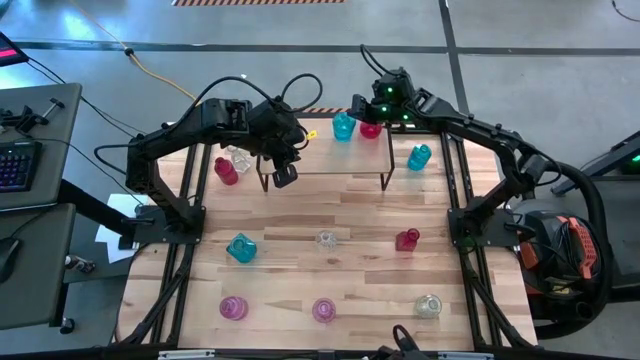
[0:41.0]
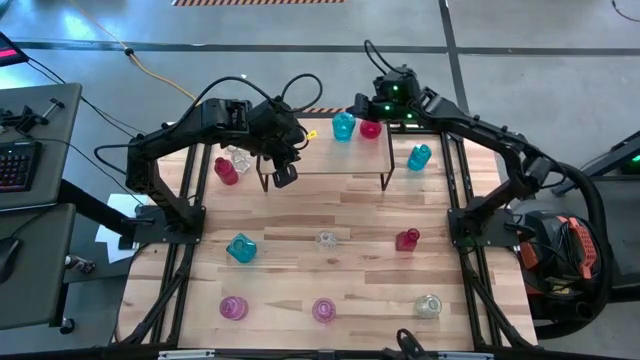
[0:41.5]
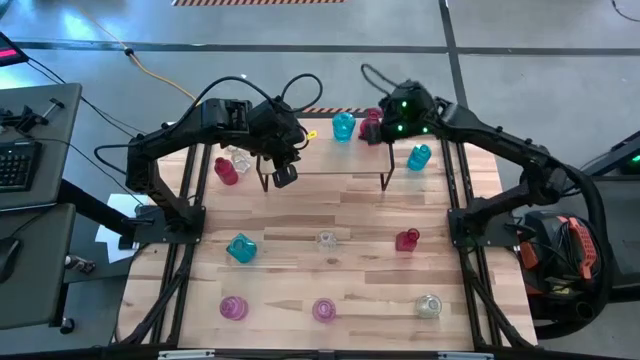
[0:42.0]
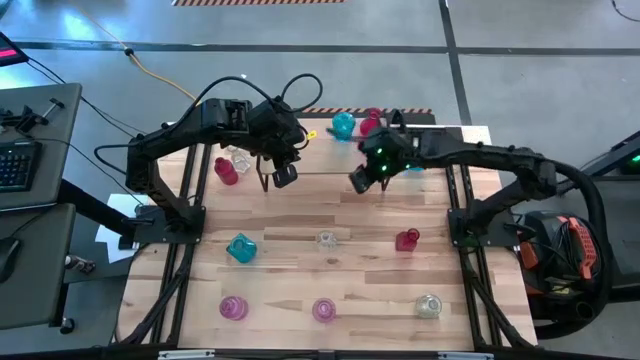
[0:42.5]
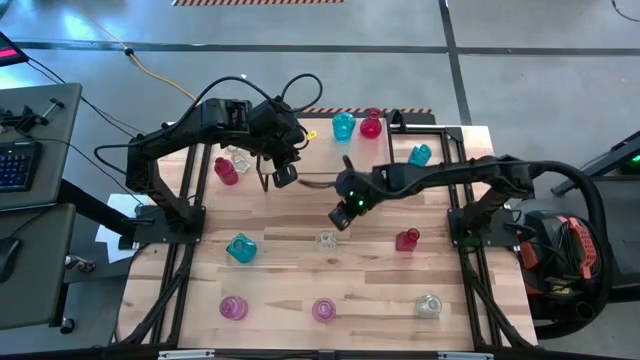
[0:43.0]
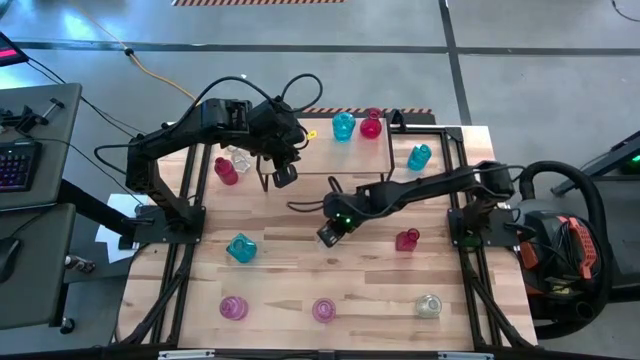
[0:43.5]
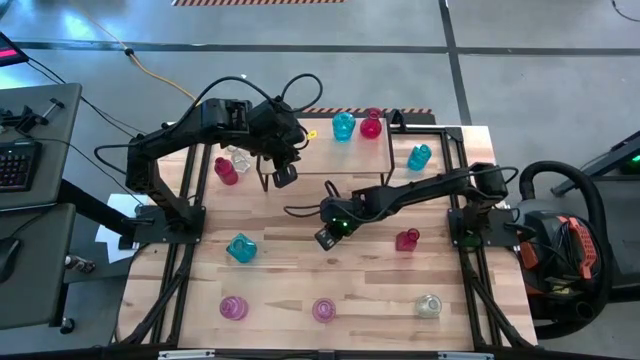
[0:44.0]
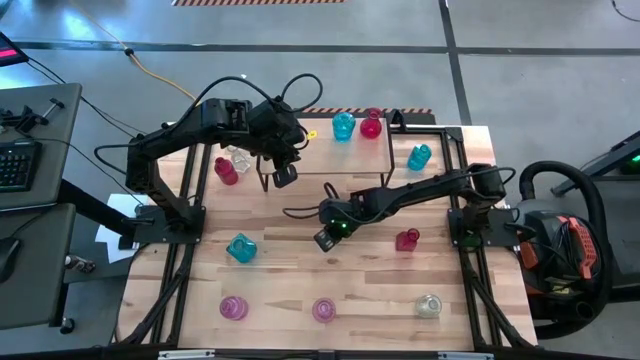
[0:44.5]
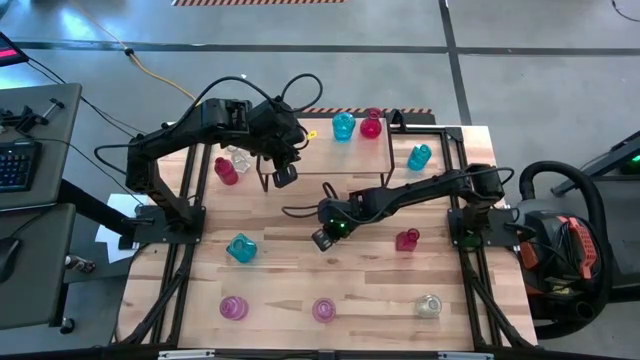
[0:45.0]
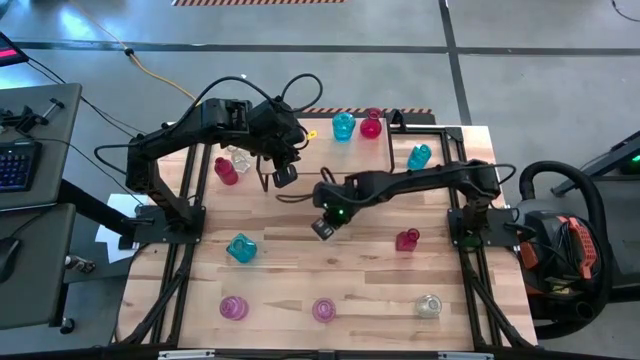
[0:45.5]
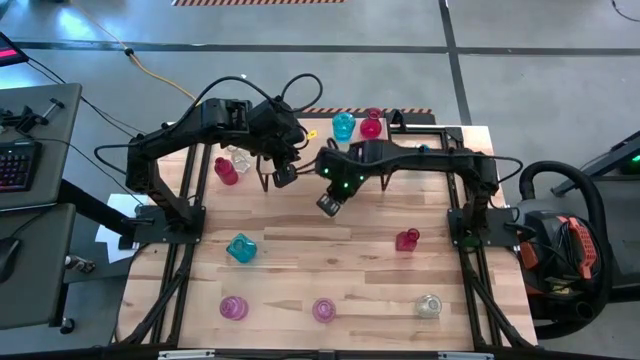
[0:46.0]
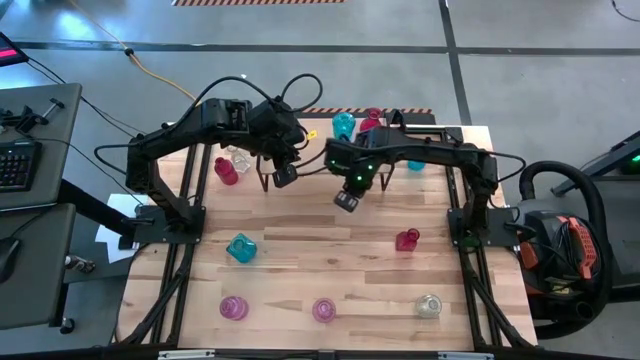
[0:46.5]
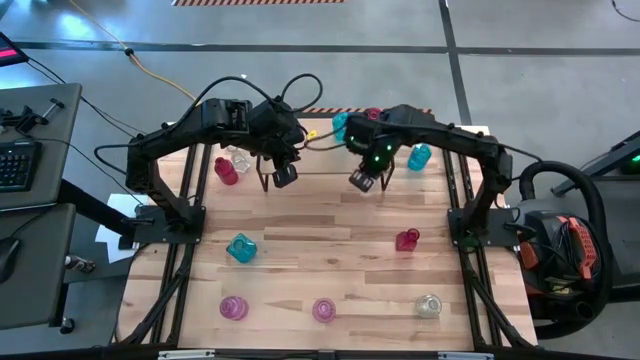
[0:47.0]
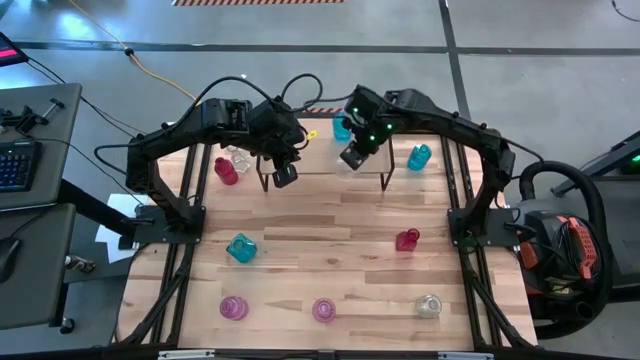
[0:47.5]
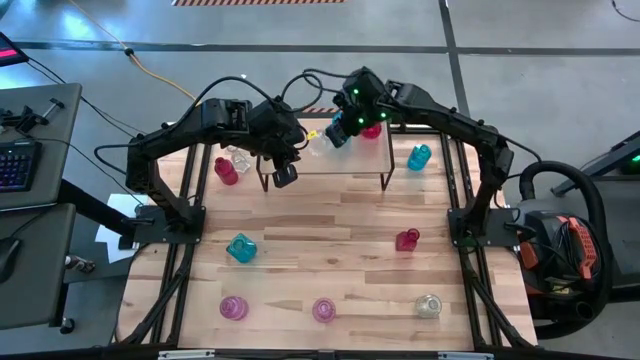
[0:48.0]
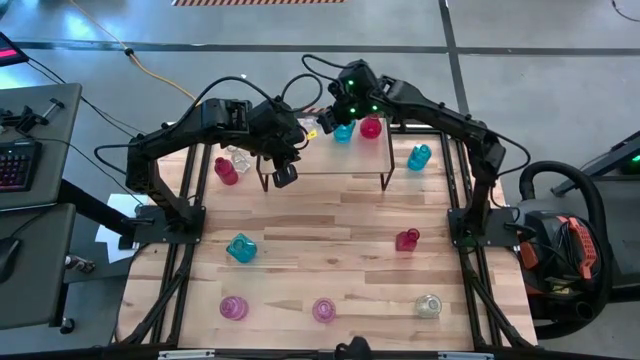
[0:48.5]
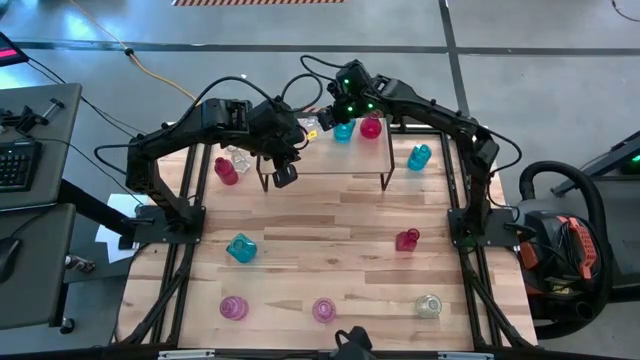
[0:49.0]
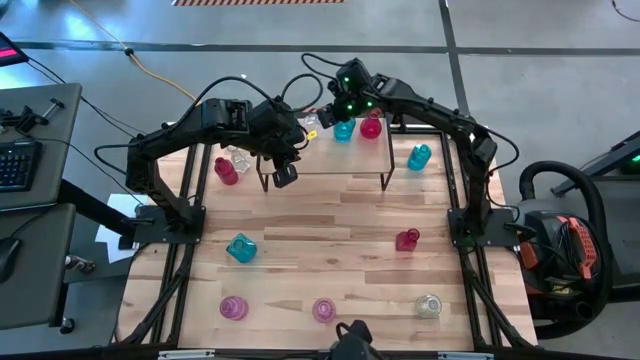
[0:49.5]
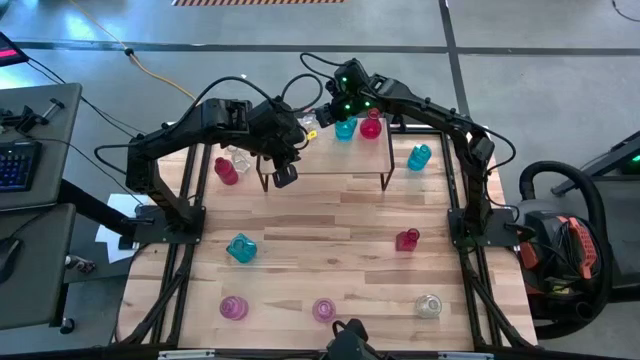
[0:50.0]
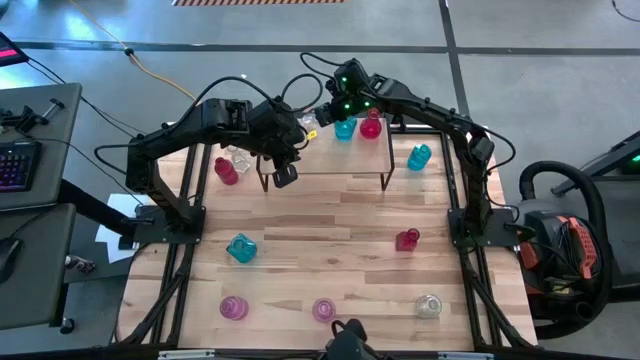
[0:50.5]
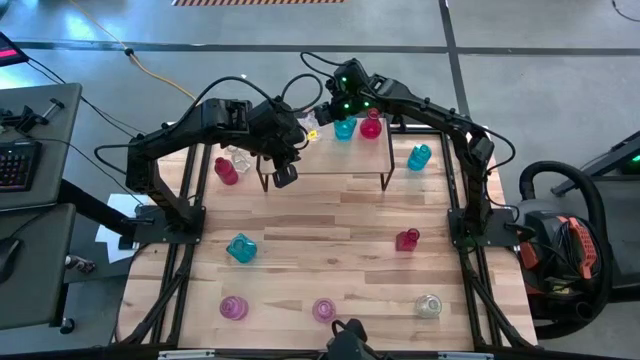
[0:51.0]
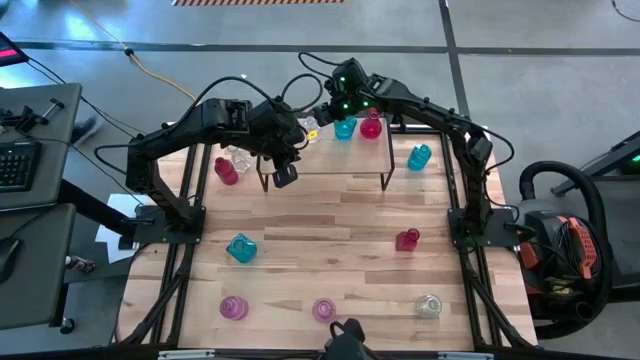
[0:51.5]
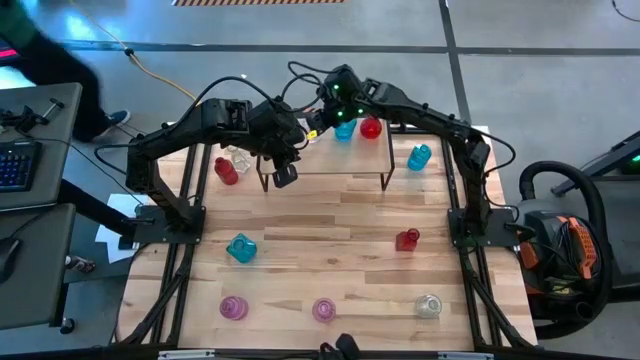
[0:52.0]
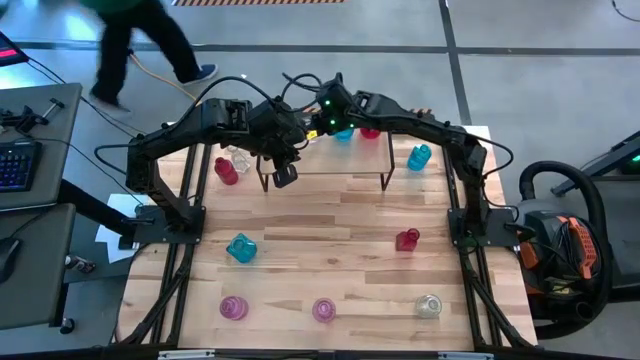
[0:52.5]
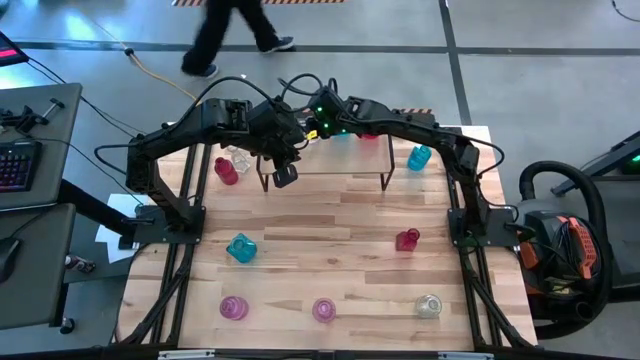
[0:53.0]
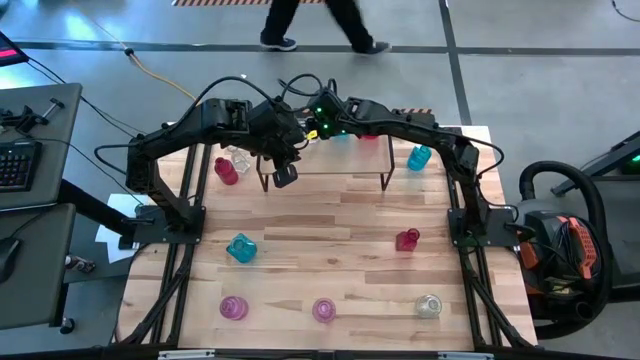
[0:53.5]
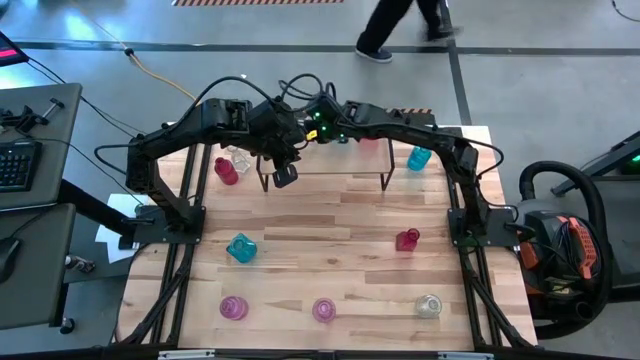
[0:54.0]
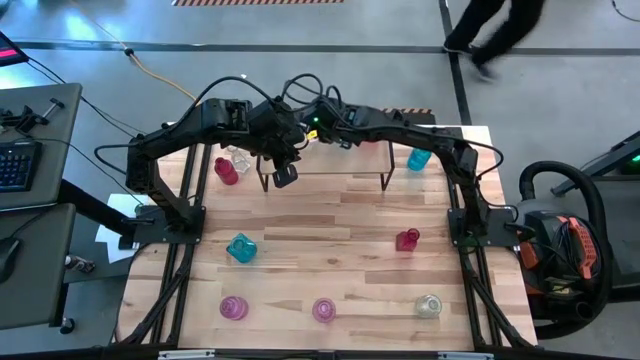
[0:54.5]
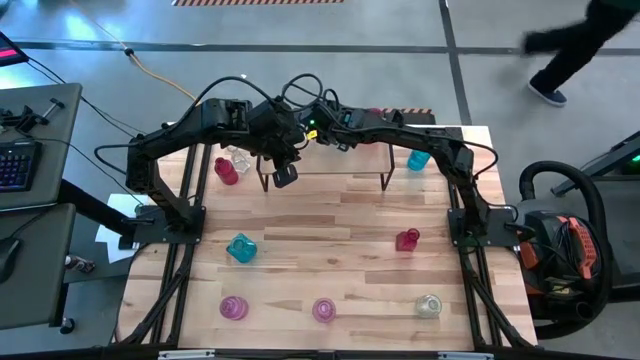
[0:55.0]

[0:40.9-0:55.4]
Task: sort vases onto shelf
Put the middle transparent vase on the shelf

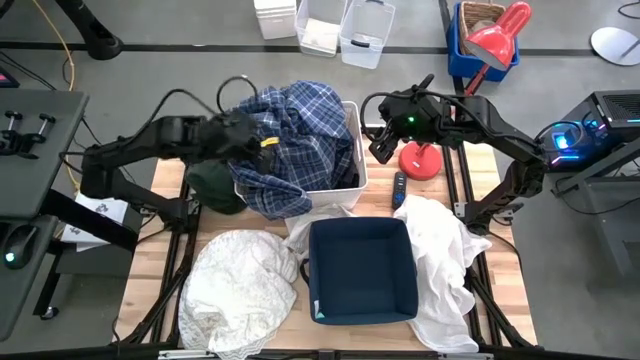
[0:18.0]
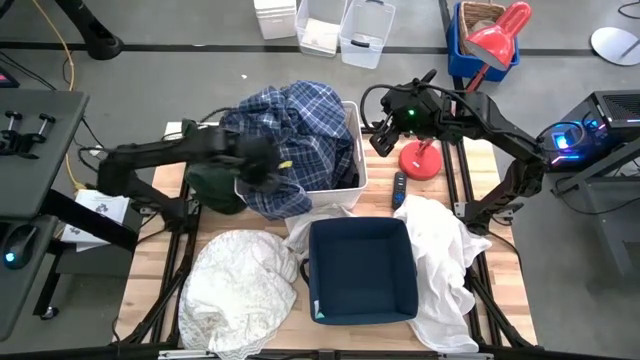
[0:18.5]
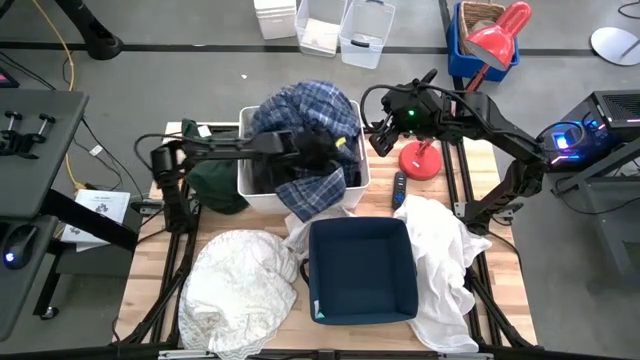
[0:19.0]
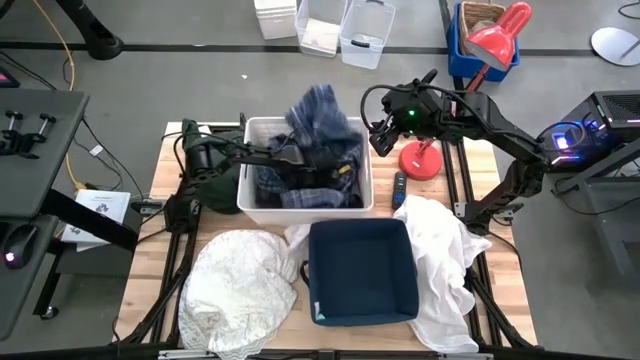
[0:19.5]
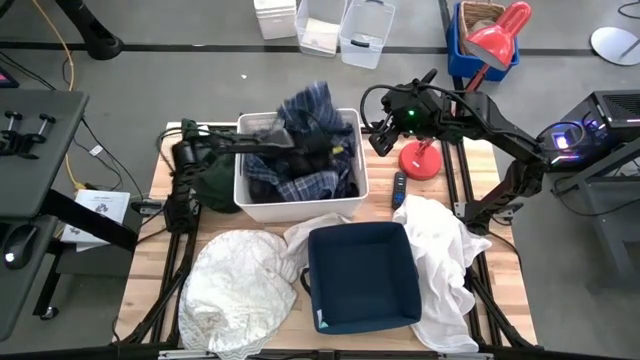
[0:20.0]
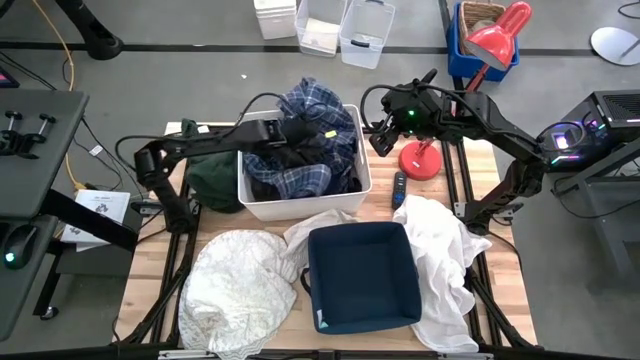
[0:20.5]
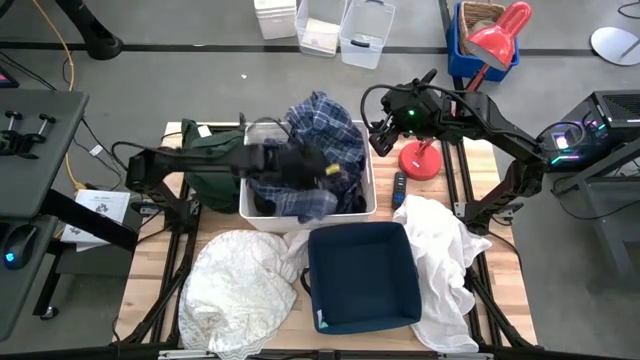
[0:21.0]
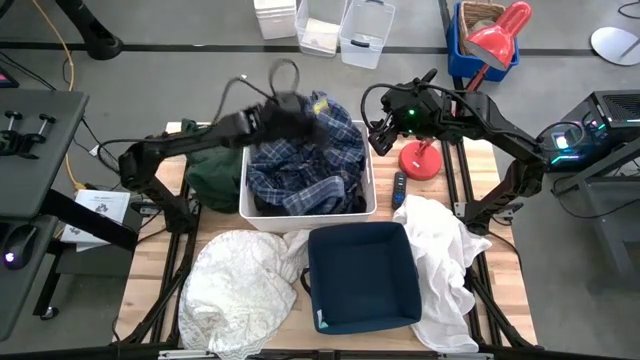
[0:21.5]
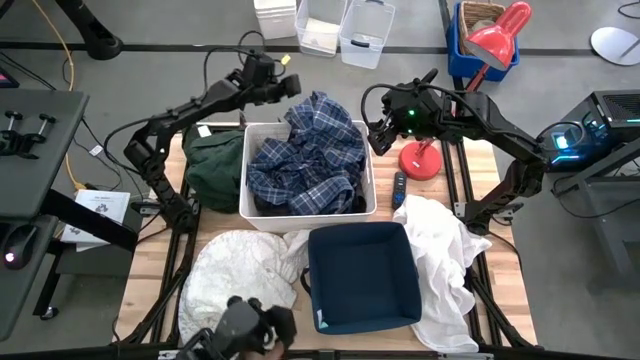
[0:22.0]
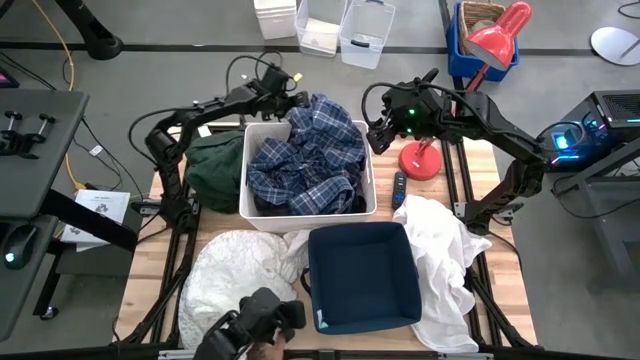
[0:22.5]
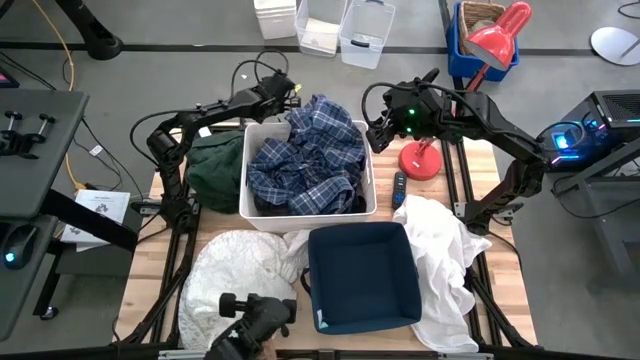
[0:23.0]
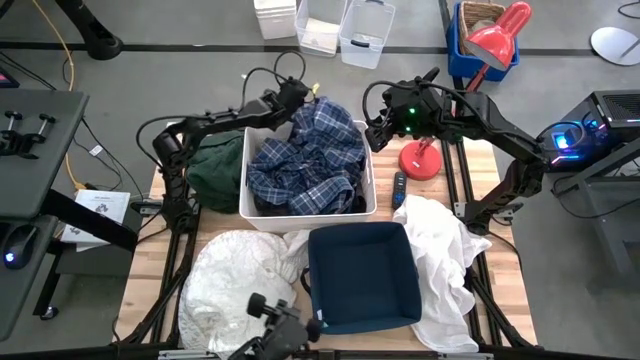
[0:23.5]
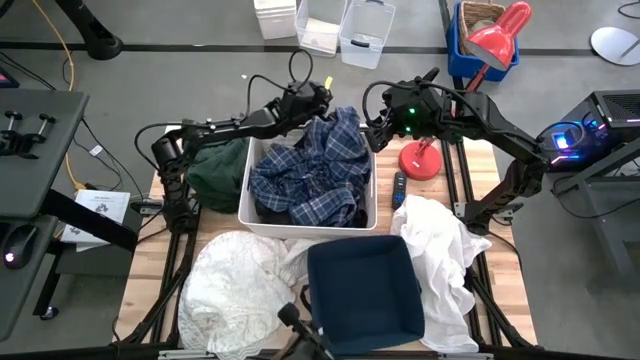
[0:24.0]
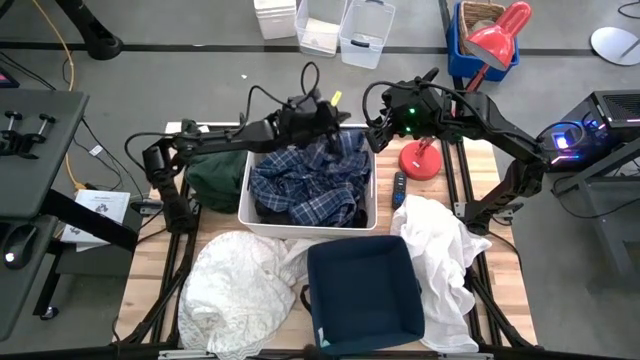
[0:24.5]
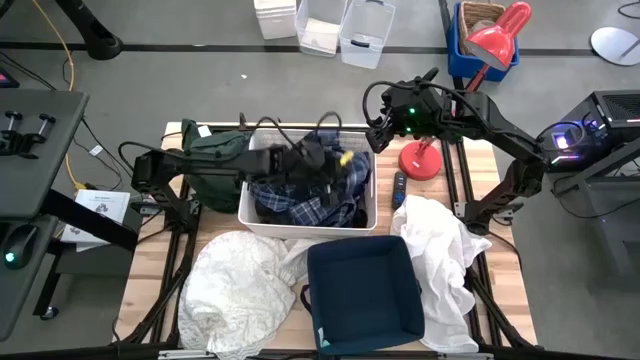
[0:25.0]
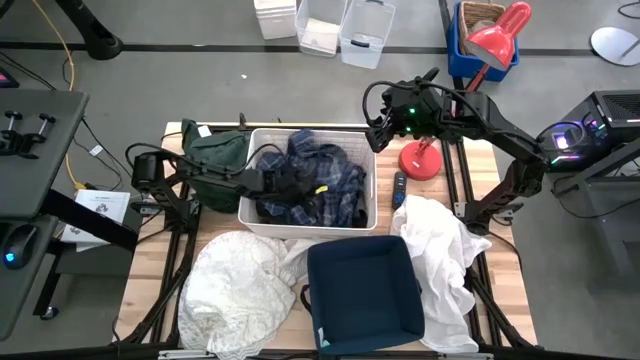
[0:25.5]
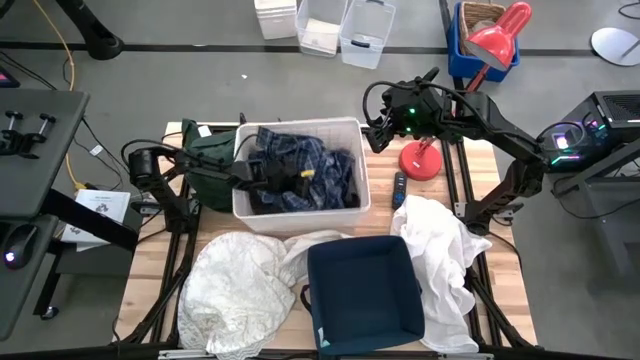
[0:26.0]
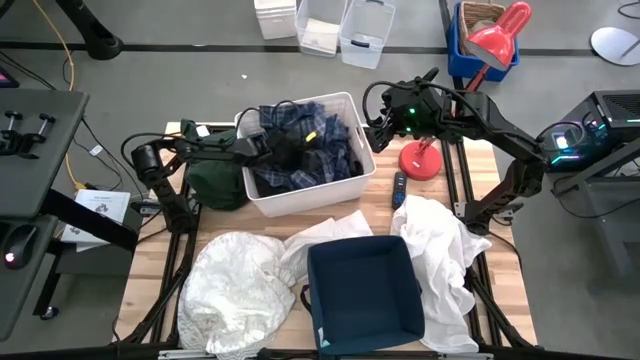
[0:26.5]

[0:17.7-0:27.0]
Task: Sort clothes
Put the blue polo into the white laundry bin
